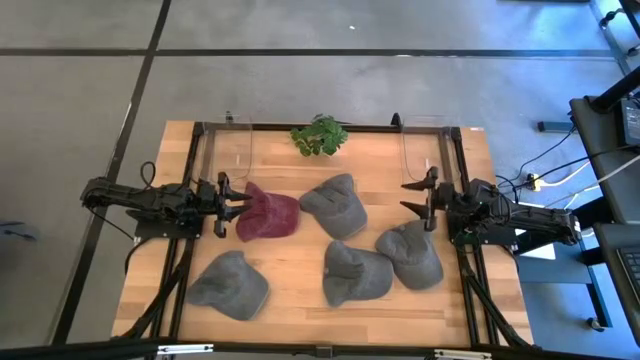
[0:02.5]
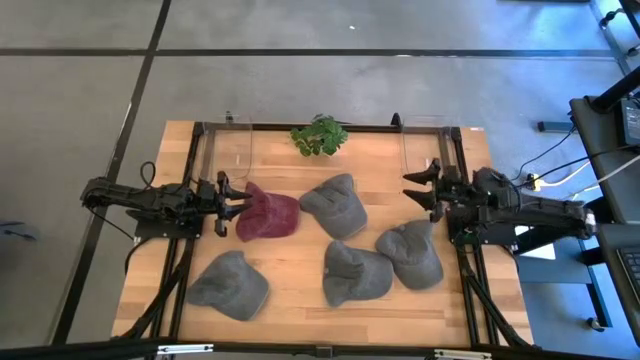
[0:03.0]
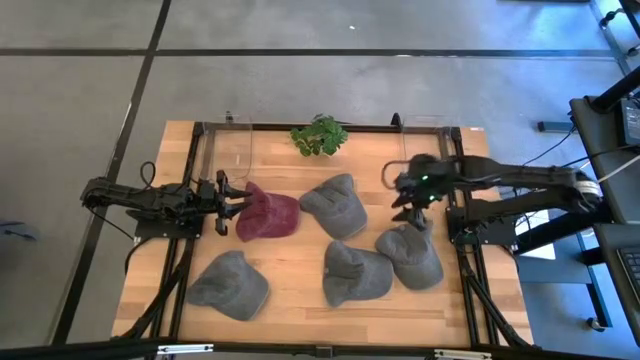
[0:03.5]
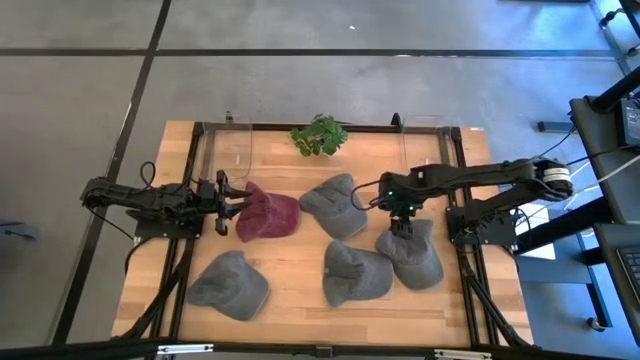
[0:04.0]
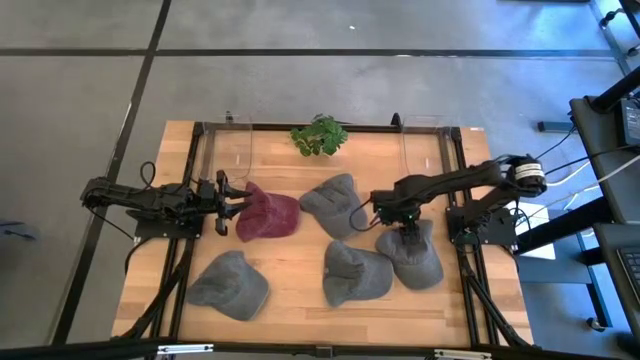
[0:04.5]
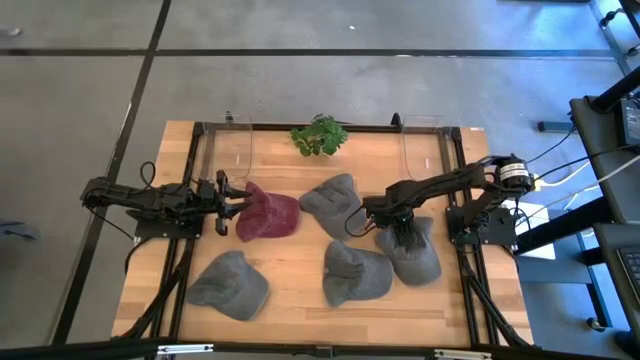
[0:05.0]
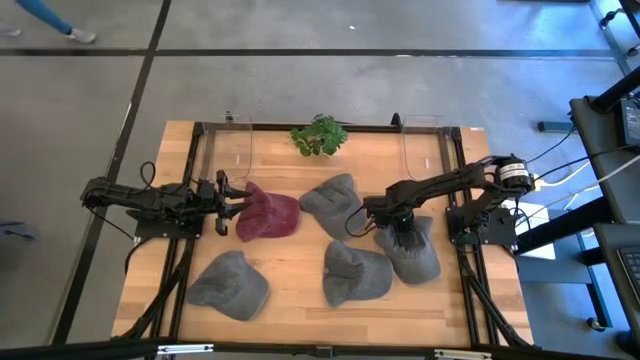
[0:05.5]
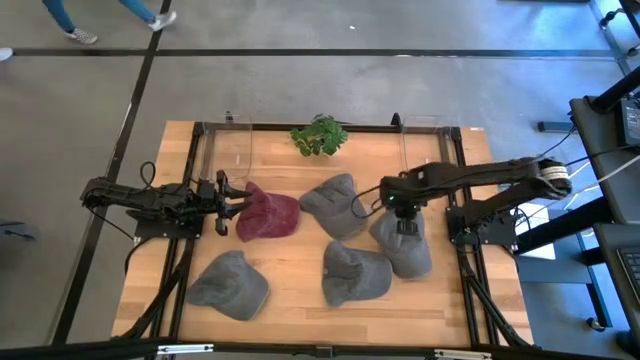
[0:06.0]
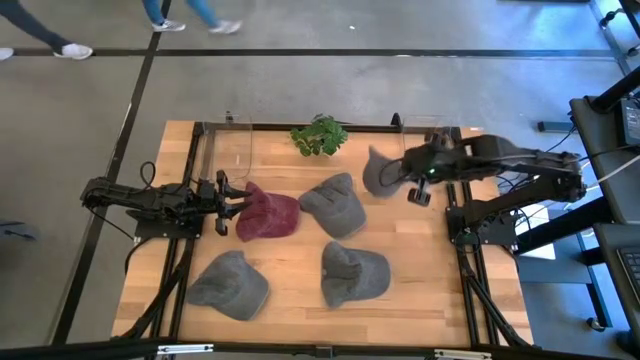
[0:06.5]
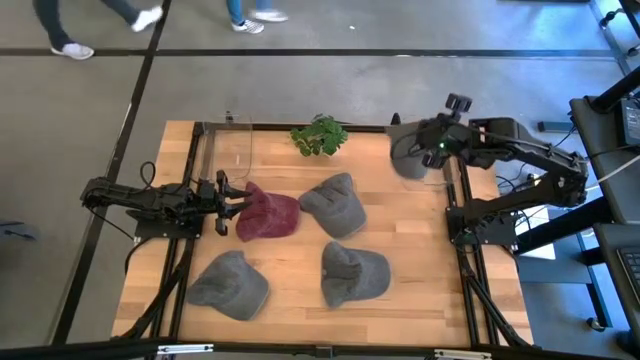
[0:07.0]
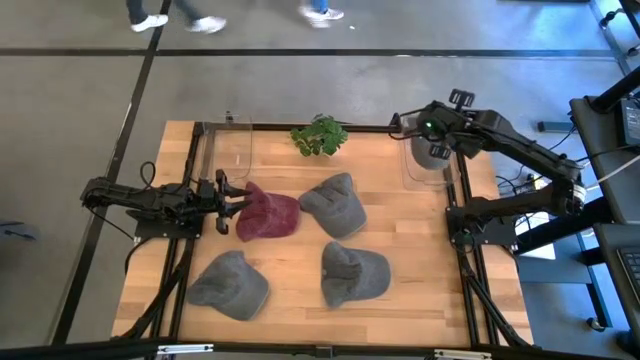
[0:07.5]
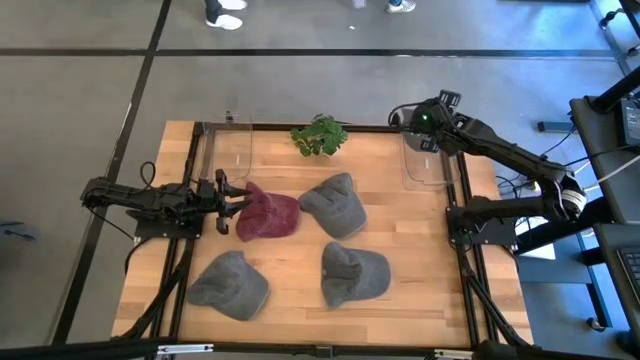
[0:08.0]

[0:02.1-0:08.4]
Task: Pick & Place hat
Put the gray cap into the right transparent bin

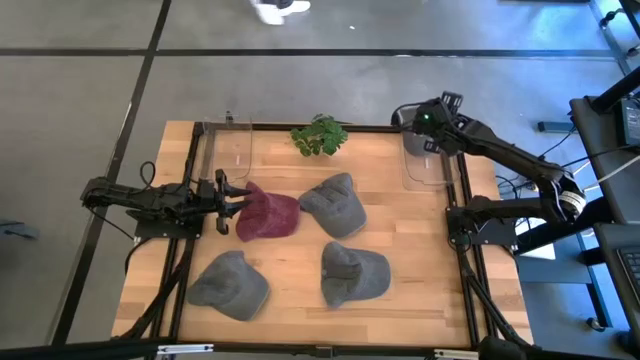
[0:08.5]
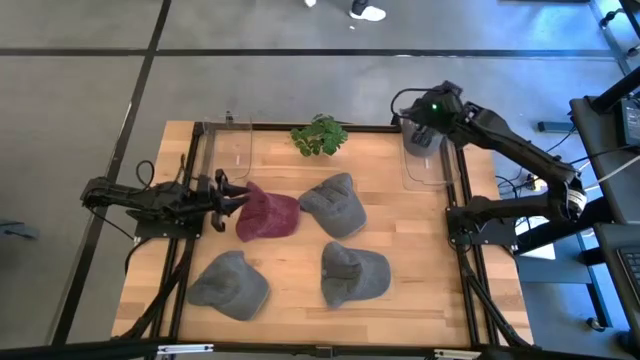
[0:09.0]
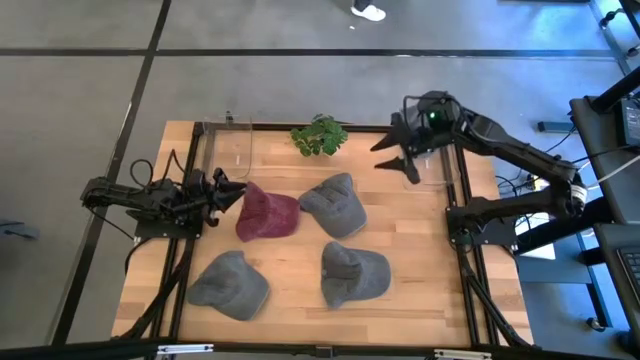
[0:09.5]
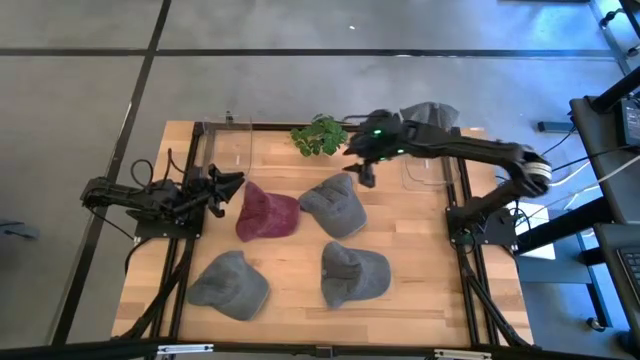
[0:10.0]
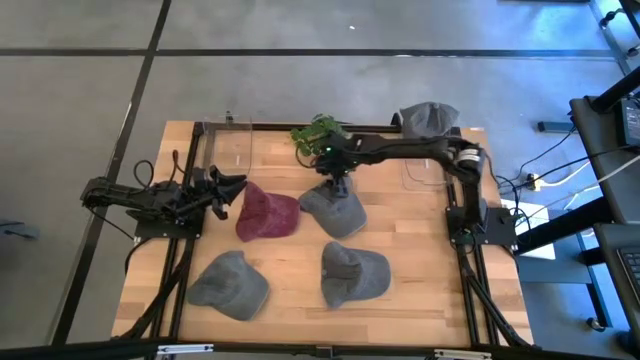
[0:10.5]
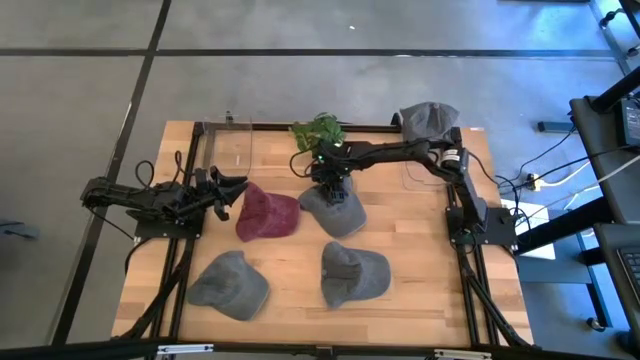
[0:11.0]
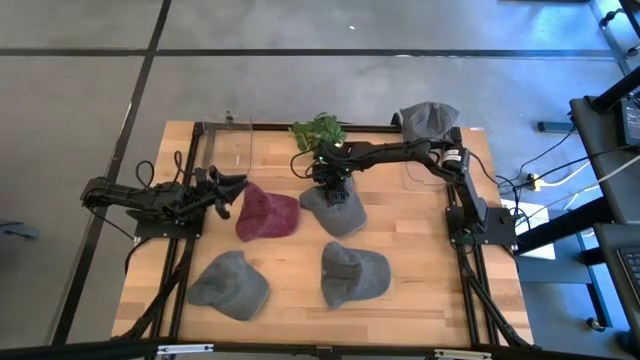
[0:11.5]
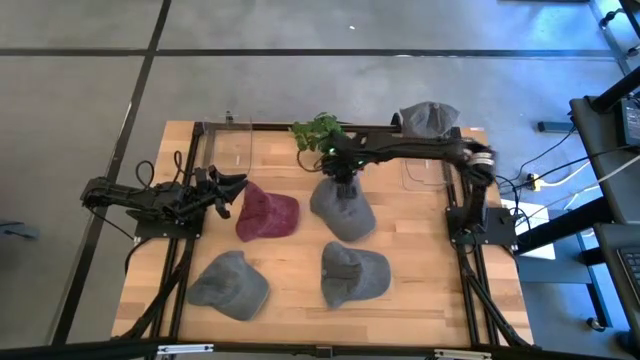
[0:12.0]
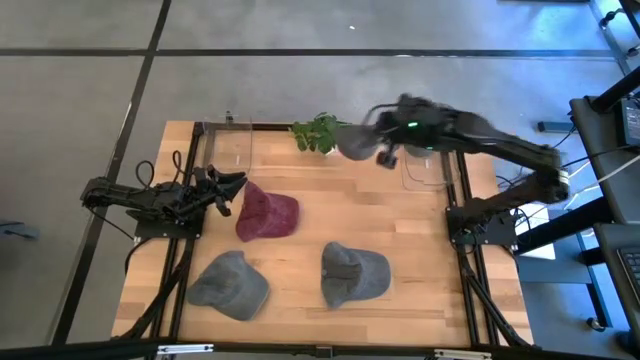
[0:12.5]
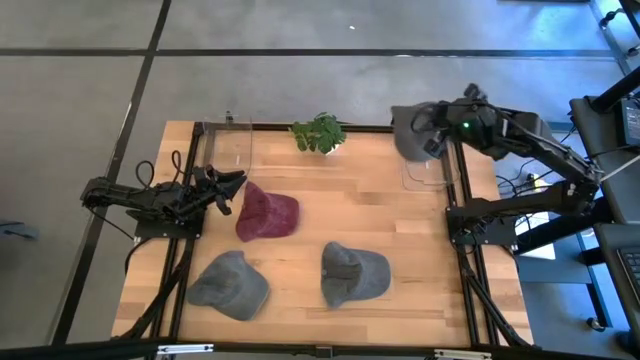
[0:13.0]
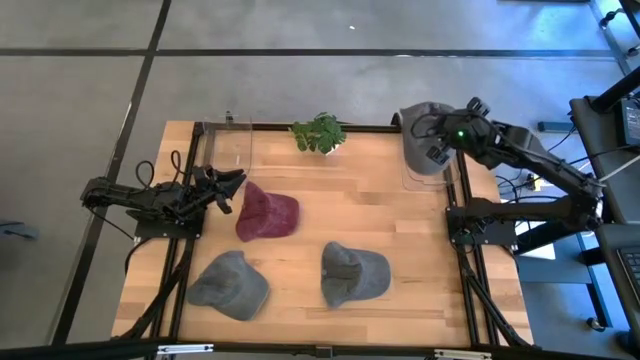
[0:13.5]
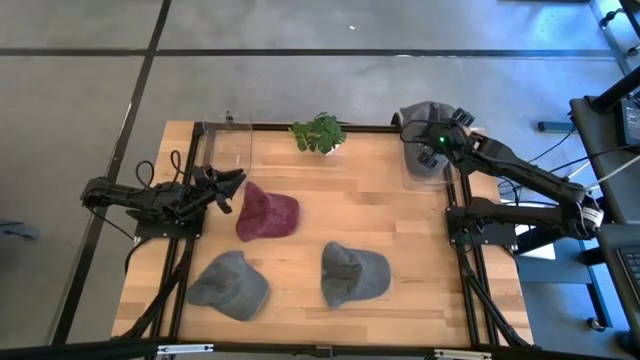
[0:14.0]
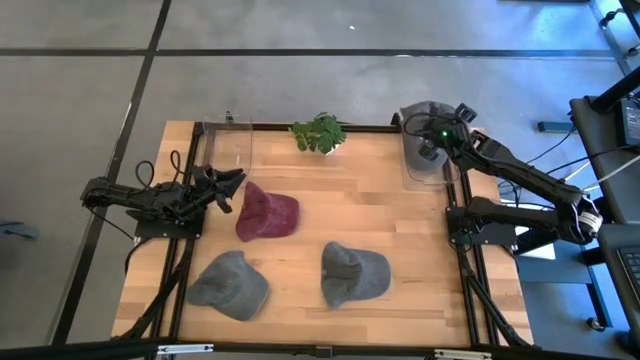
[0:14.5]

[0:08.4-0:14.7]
Put the gray cap into the right transparent bin

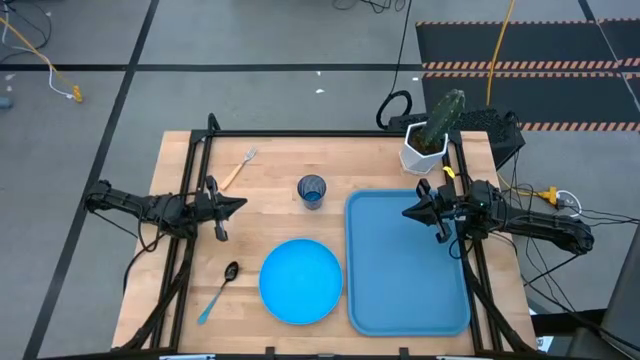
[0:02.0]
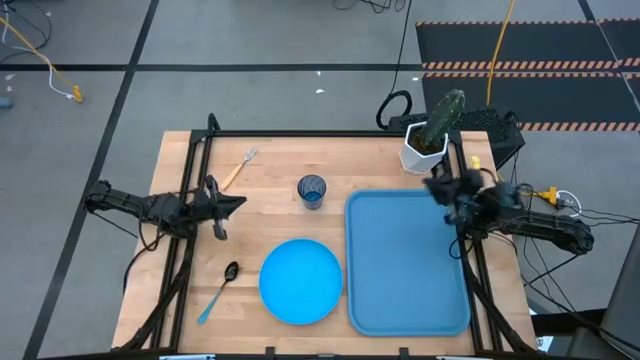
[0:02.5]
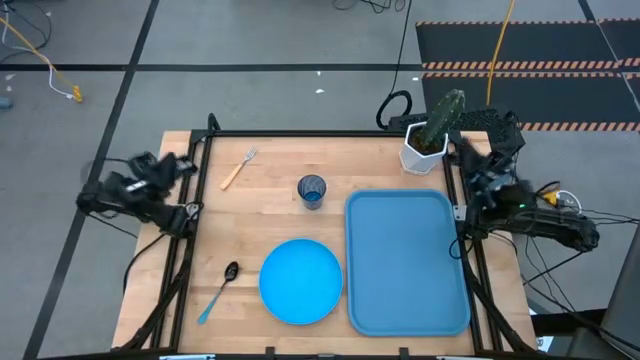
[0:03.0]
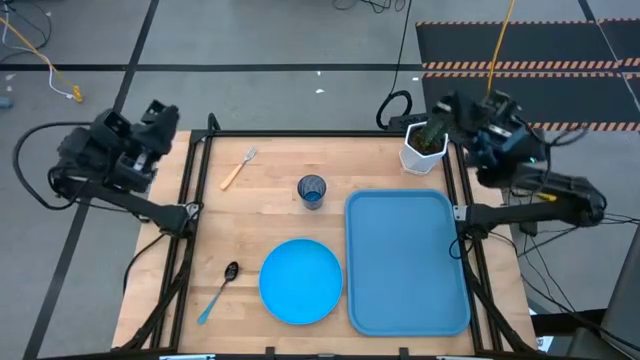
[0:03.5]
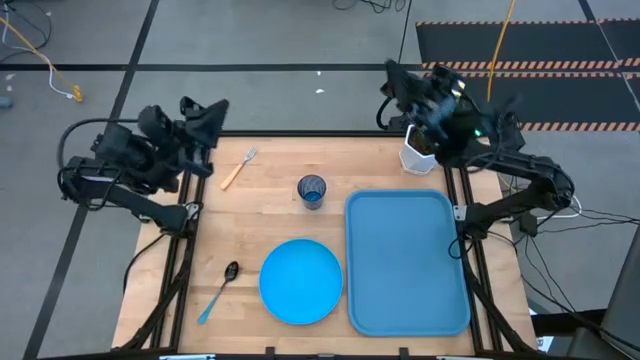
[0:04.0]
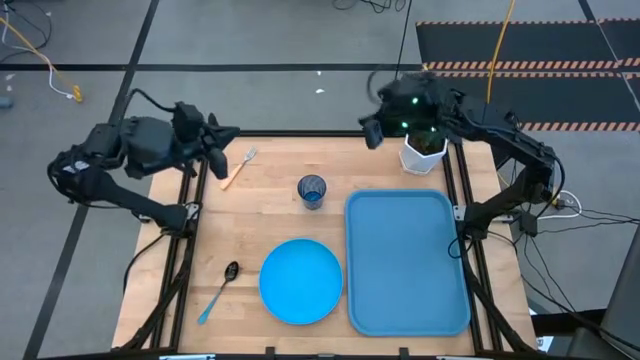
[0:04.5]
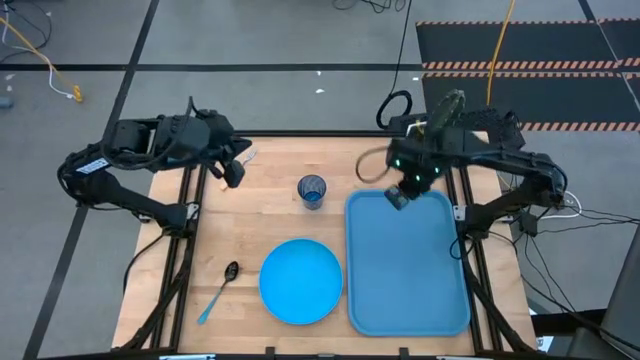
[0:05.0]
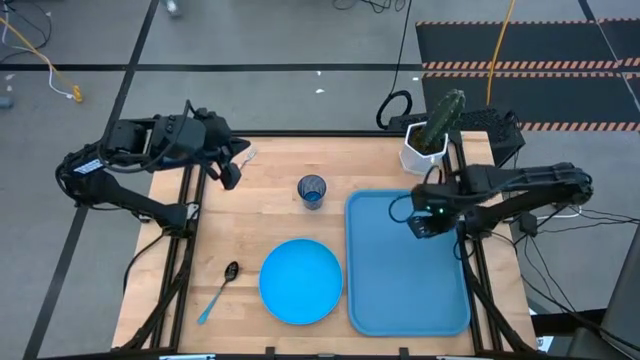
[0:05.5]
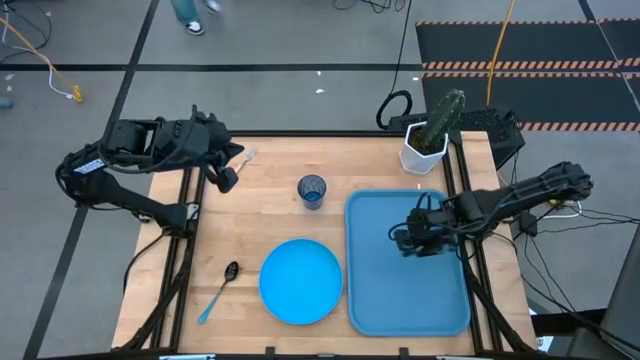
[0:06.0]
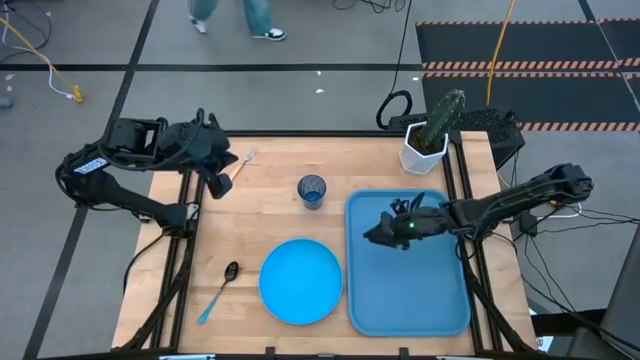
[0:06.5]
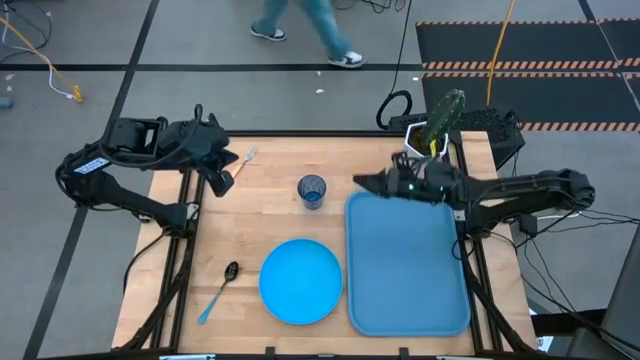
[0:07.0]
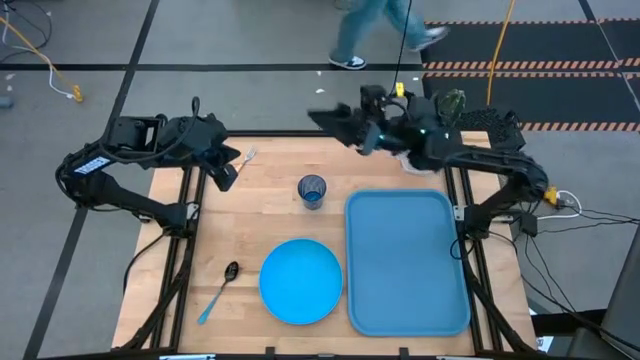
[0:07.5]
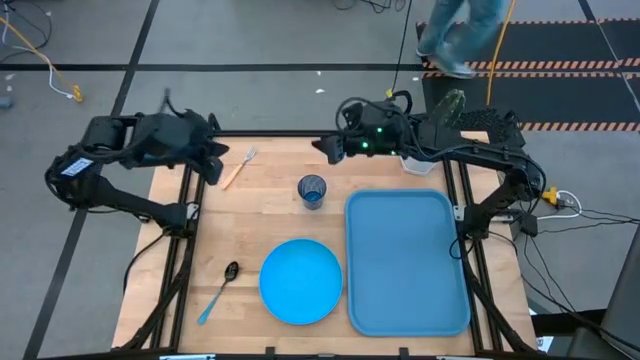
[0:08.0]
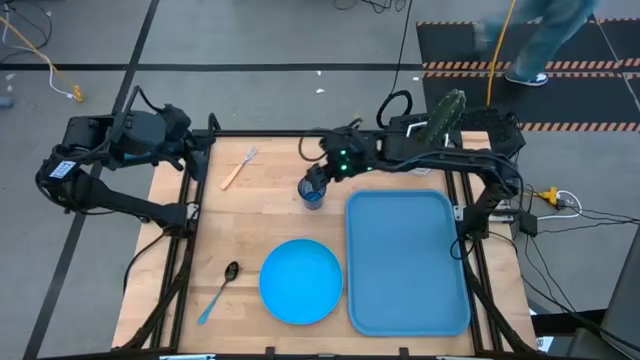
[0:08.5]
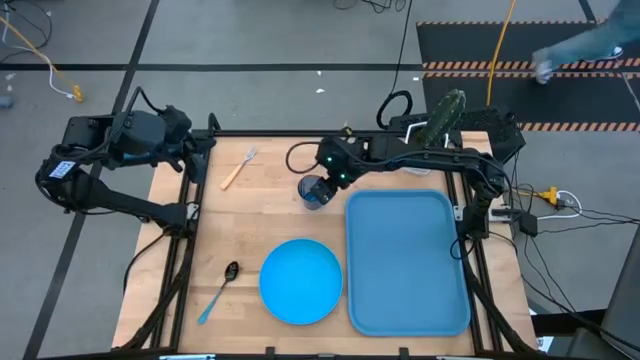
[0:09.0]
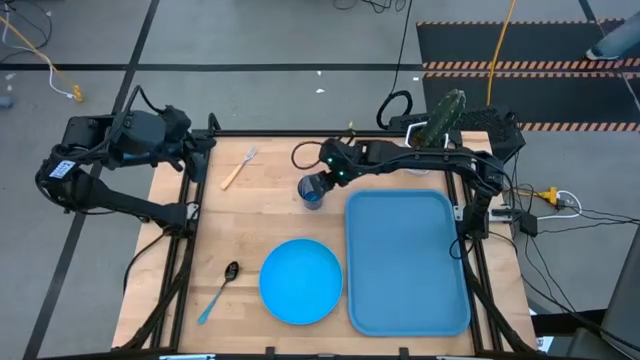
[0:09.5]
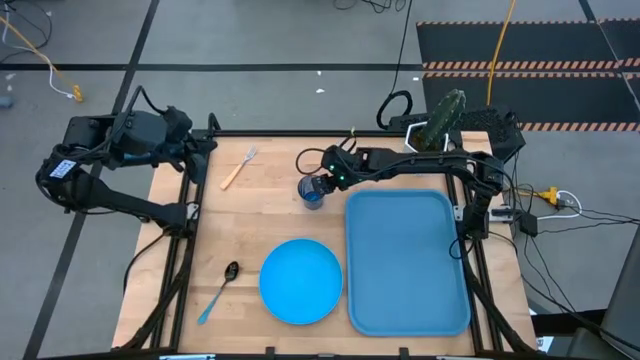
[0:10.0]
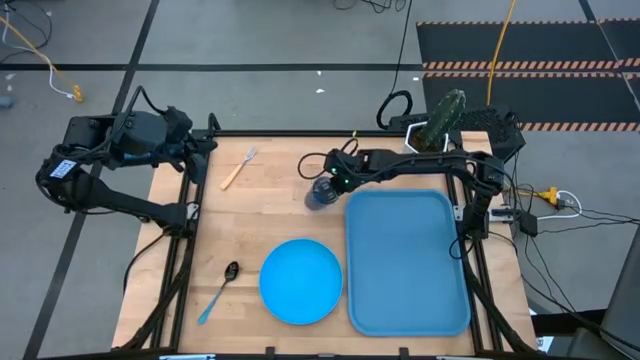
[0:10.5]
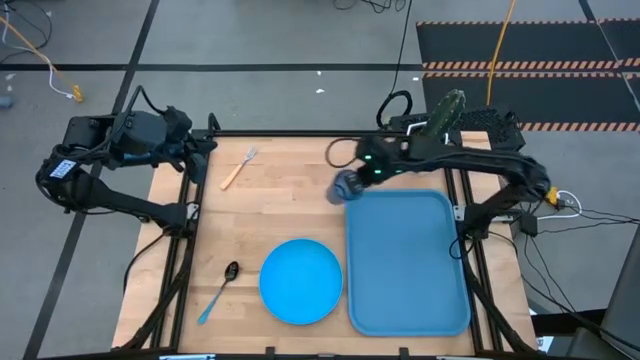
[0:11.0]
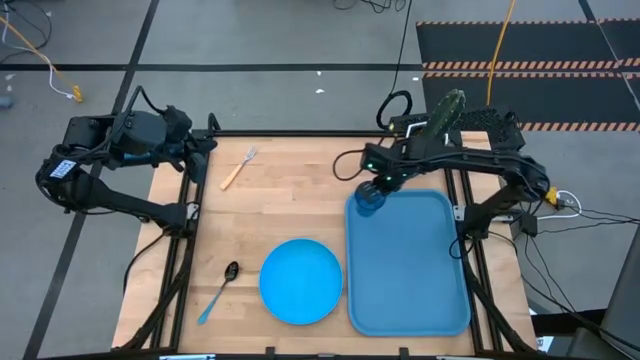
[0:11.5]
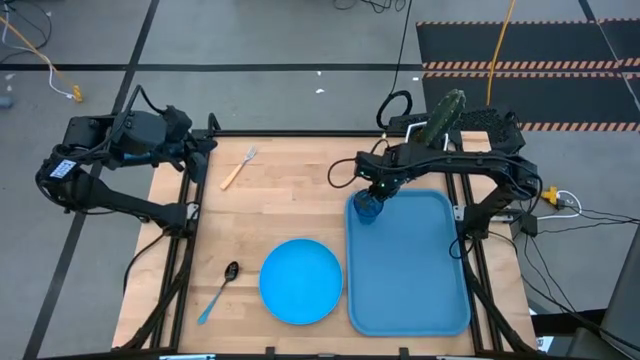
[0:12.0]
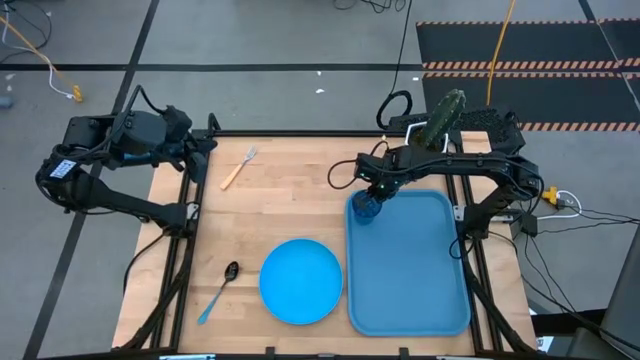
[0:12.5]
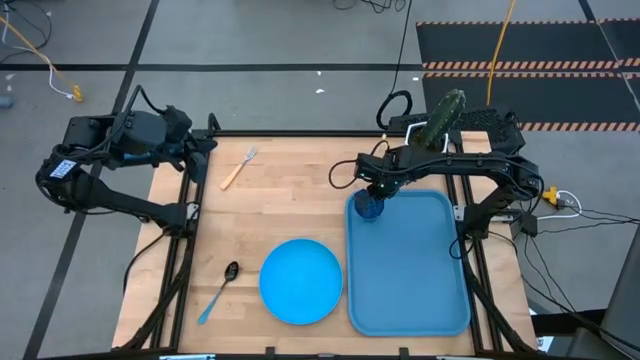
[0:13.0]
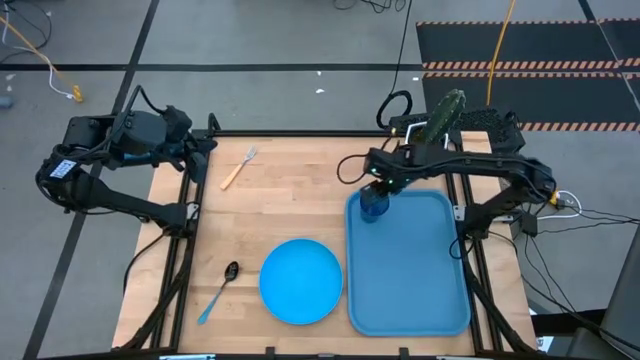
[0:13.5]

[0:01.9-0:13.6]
Task: Pick and place plate/cup/fork/spoon on tray
Put the dark blue cup on the blue tray
